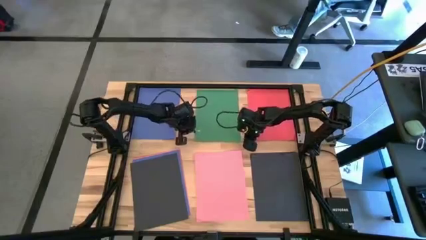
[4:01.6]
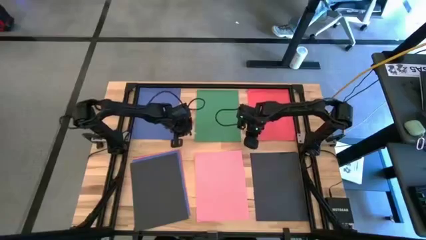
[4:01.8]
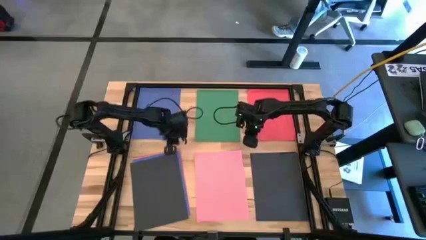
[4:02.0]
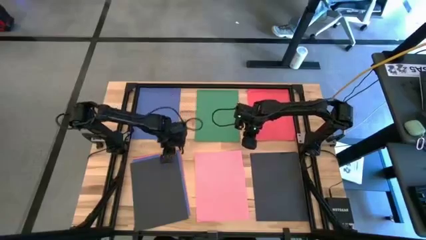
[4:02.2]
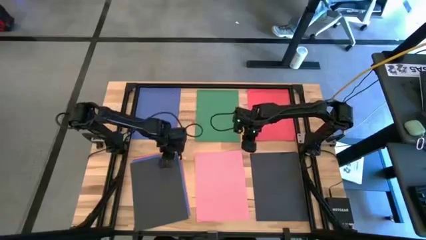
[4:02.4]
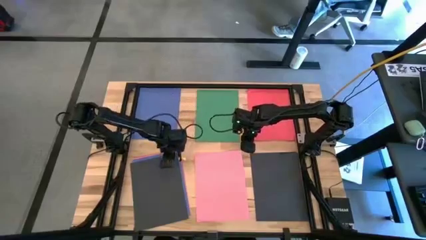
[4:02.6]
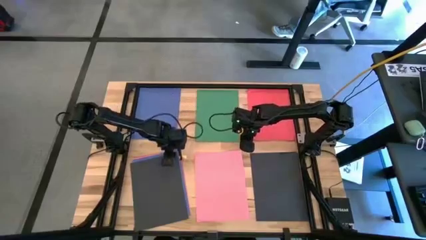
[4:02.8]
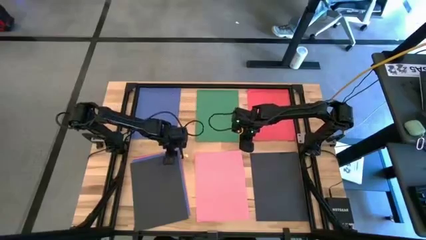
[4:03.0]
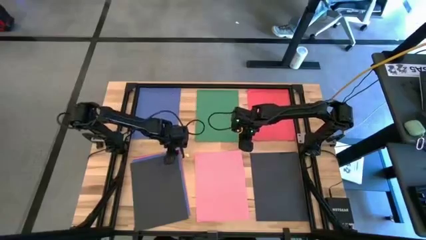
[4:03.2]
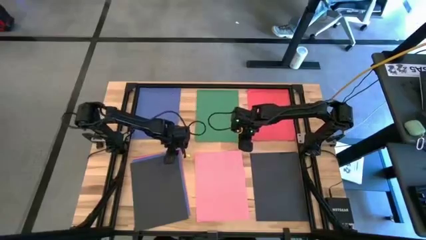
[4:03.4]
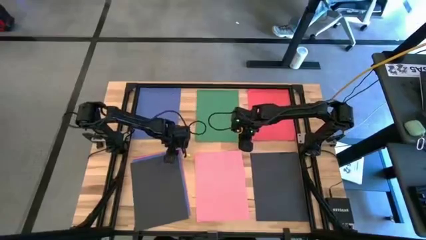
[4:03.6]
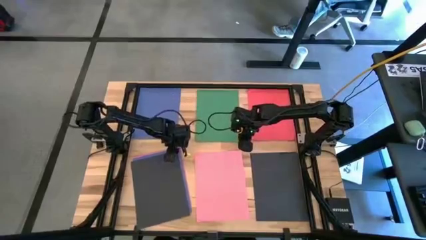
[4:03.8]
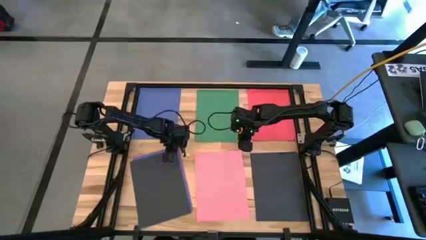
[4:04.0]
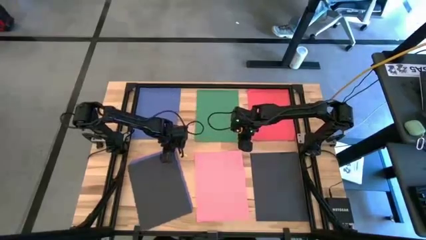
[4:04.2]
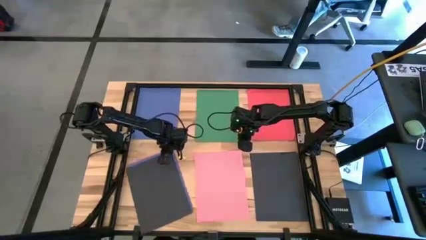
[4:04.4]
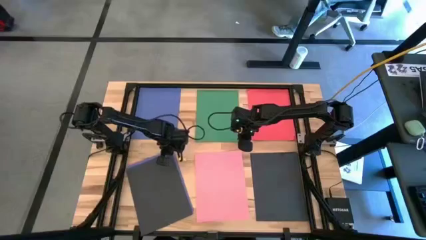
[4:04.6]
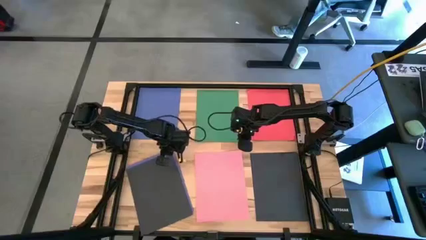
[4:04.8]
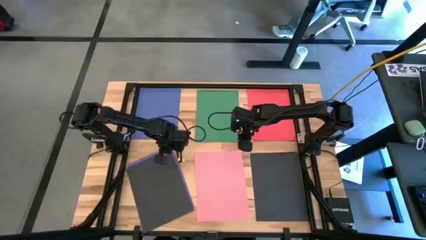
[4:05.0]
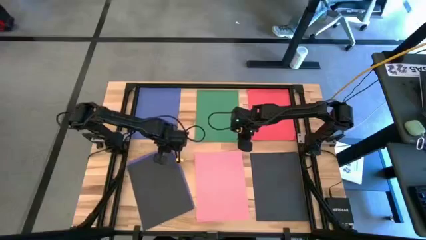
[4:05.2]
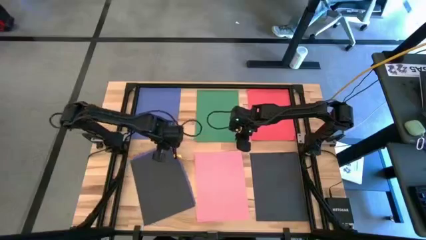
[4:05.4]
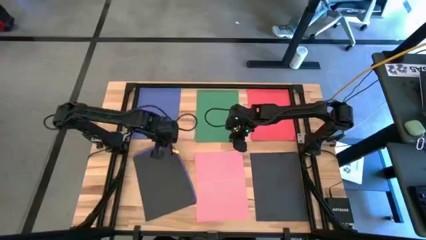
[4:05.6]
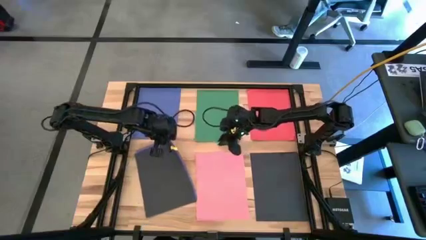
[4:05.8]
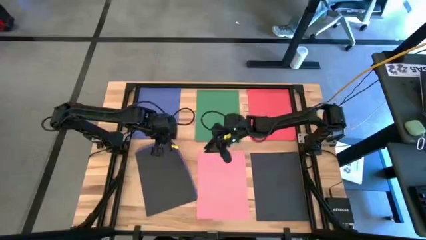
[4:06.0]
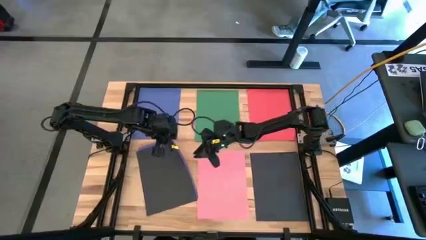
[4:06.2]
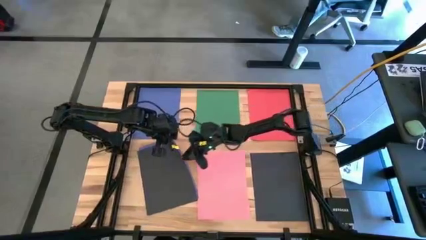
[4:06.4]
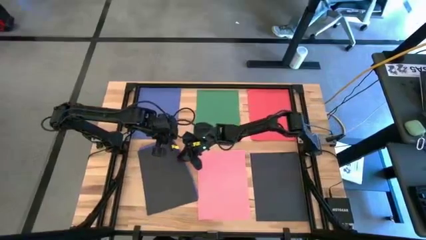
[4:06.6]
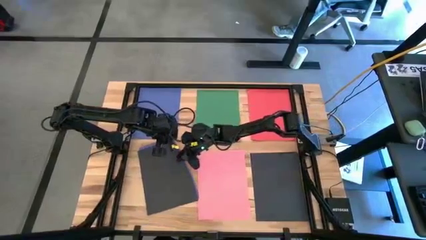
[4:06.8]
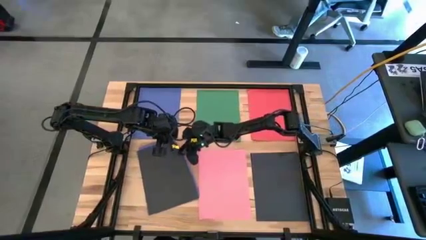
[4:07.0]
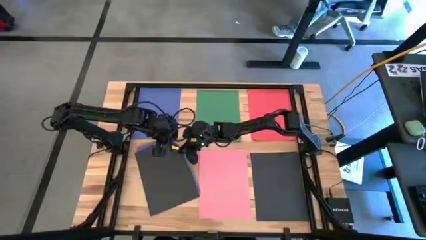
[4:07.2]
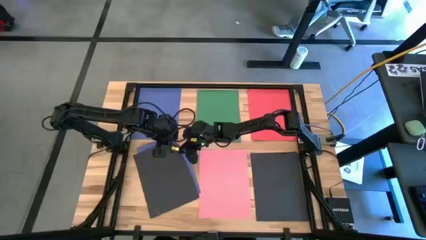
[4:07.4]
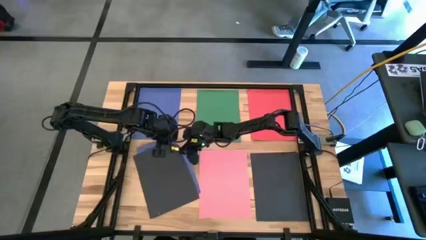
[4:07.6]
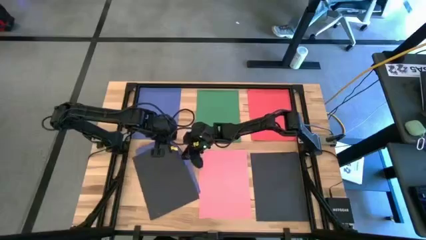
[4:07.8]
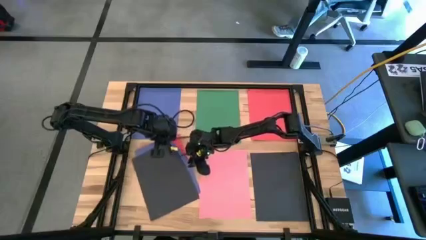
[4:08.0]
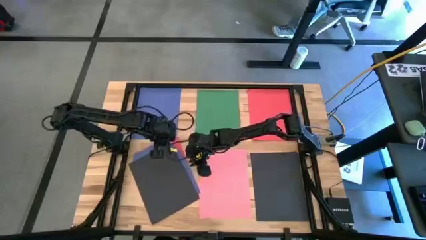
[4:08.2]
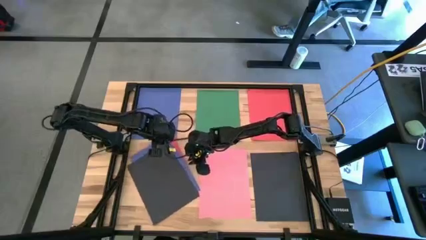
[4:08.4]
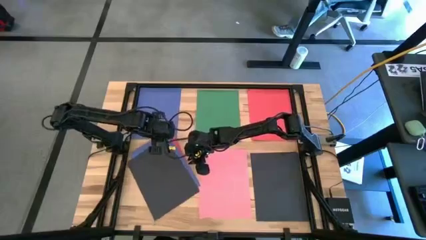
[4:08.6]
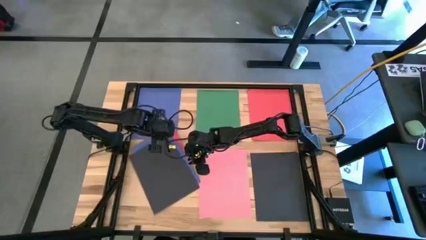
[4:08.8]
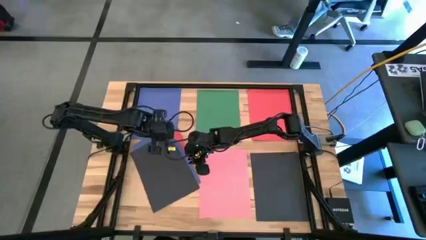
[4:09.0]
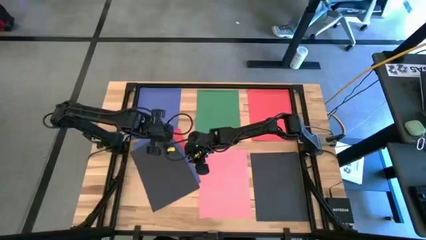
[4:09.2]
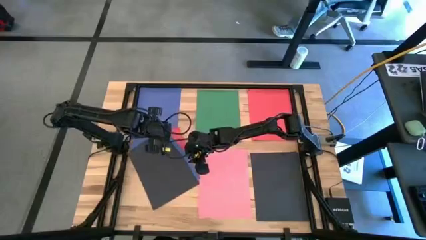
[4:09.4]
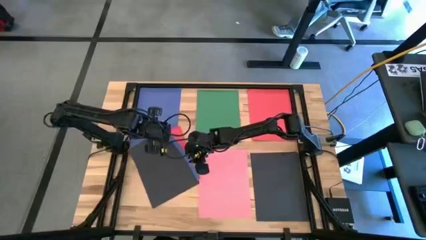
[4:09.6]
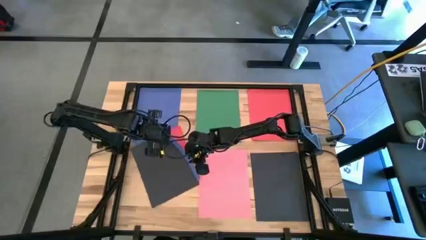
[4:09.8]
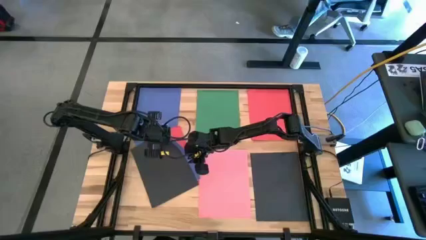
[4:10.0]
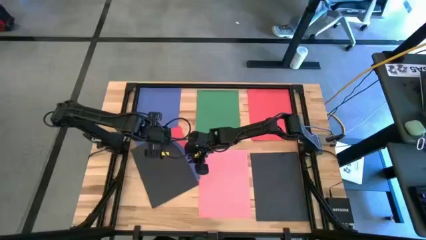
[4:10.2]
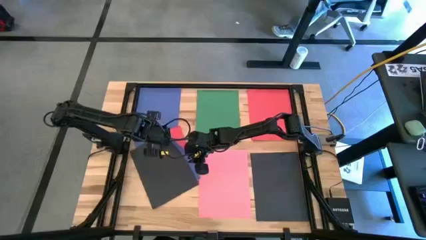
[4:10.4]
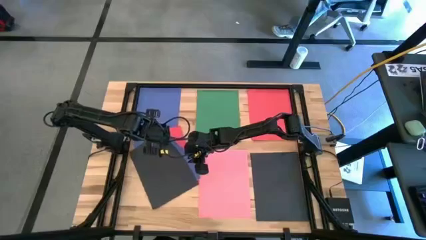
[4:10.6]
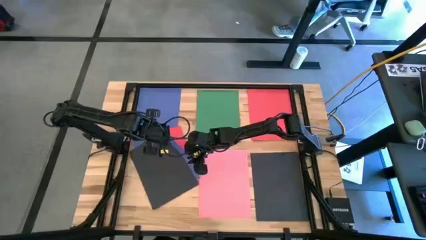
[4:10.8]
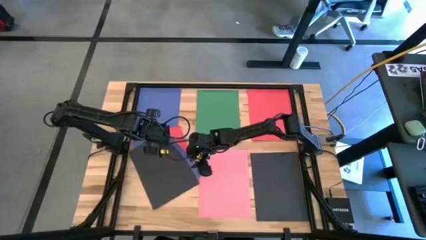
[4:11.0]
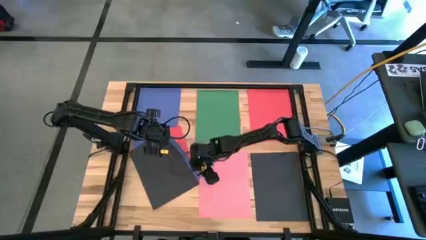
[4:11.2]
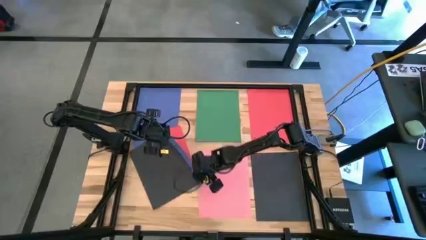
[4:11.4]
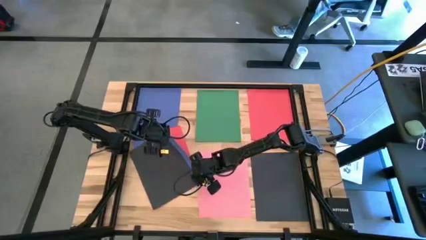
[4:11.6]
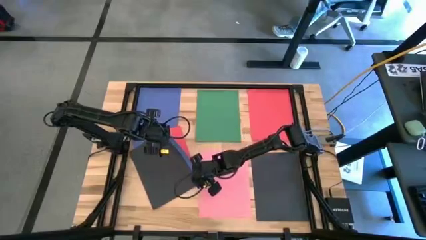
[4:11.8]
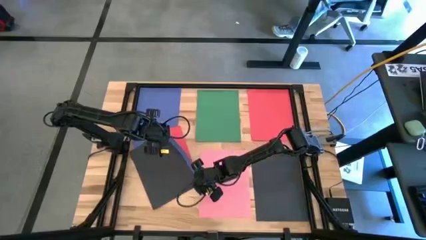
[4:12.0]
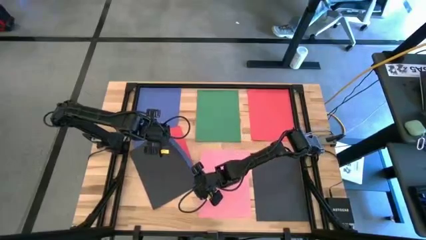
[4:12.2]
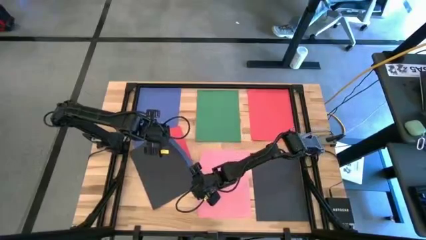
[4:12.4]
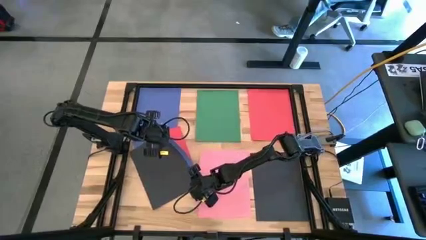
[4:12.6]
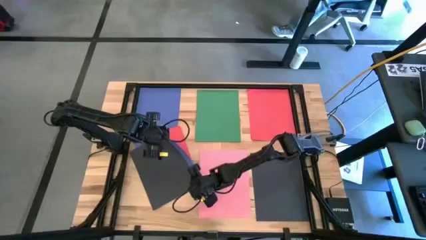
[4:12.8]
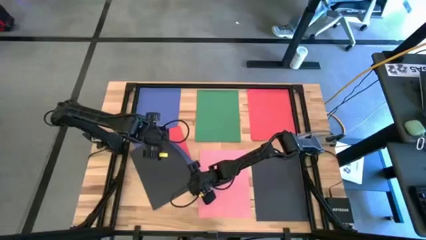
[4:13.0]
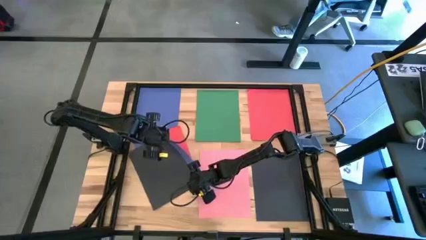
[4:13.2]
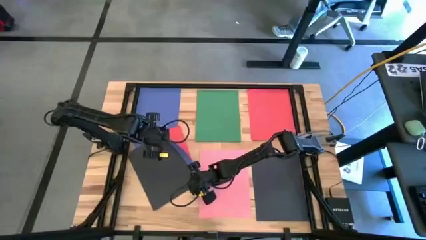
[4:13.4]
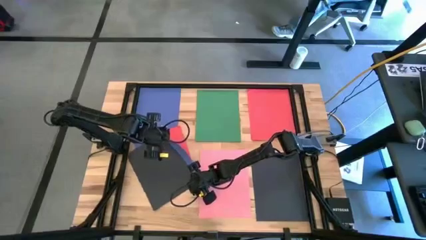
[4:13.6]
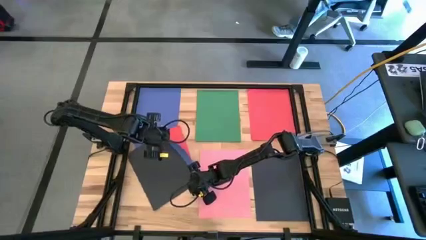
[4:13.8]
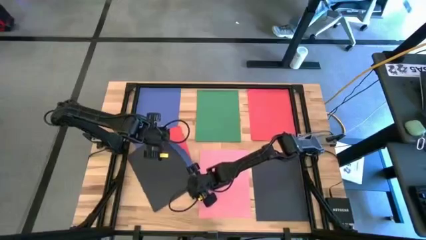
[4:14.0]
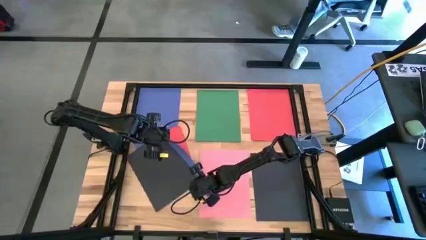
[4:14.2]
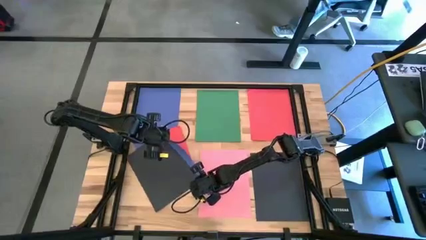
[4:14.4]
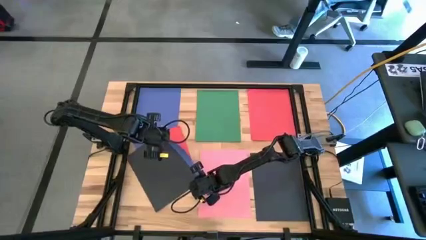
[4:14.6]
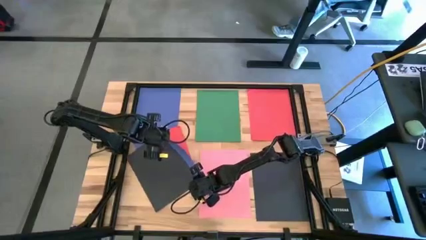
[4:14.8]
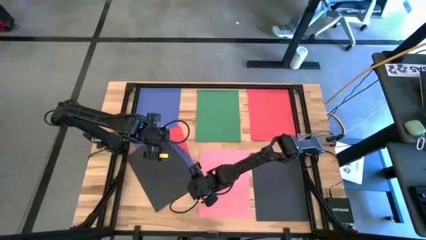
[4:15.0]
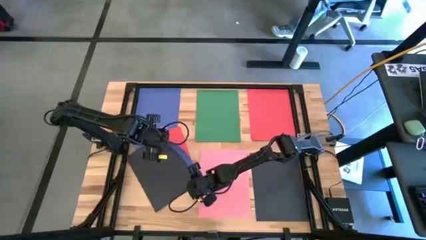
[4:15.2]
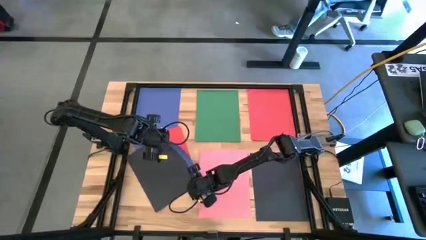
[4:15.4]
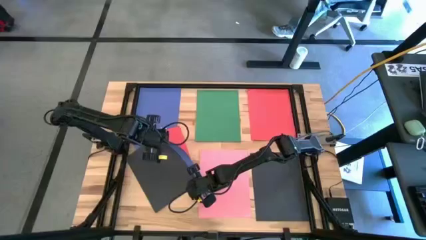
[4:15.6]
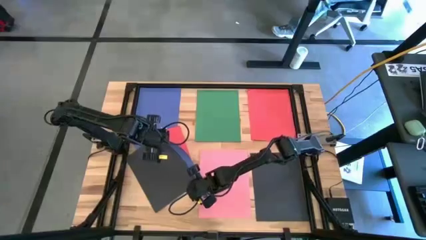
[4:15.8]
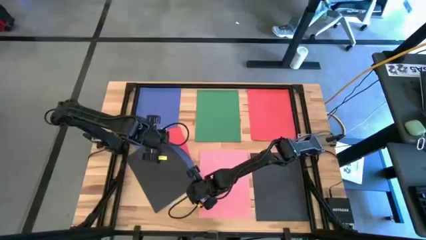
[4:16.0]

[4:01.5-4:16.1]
Task: Organize paper
Stack the black paper on top of the other black paper

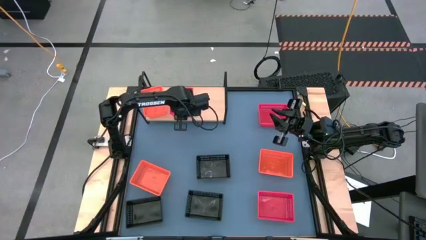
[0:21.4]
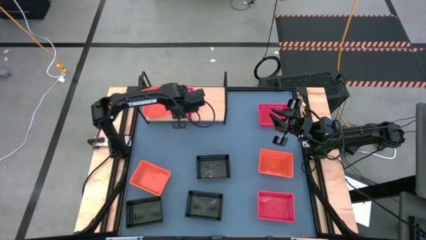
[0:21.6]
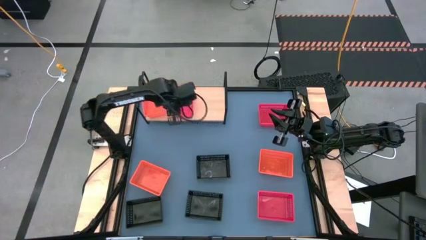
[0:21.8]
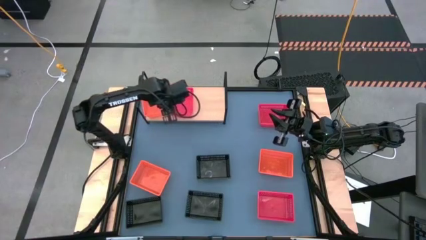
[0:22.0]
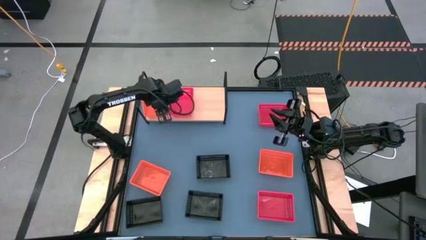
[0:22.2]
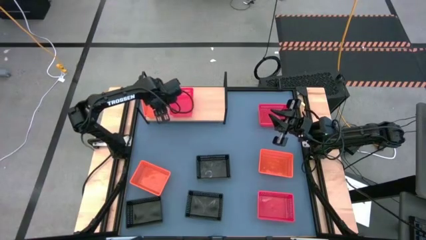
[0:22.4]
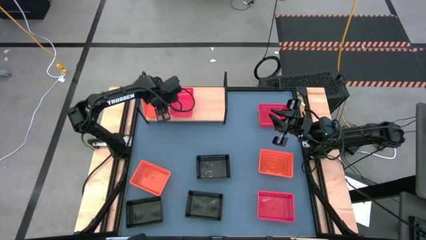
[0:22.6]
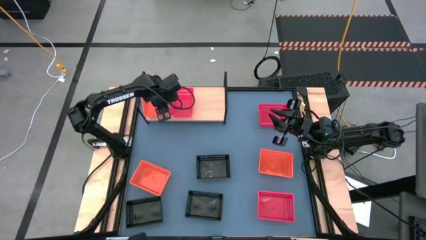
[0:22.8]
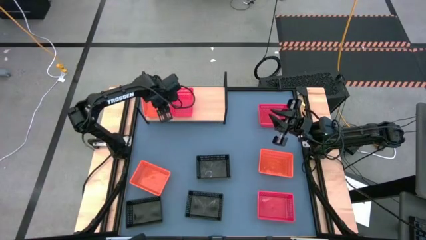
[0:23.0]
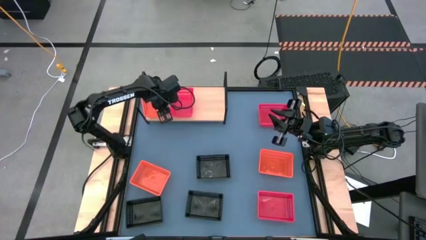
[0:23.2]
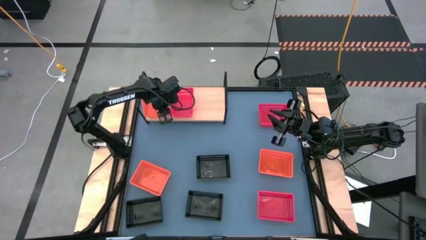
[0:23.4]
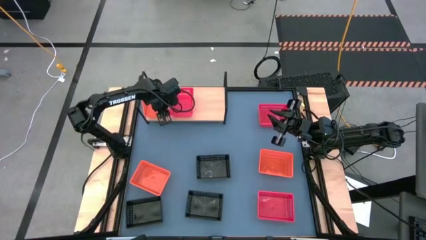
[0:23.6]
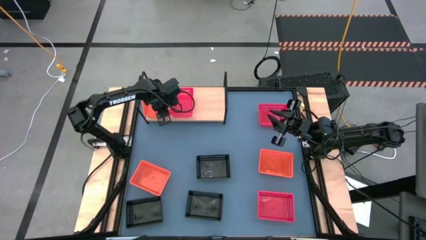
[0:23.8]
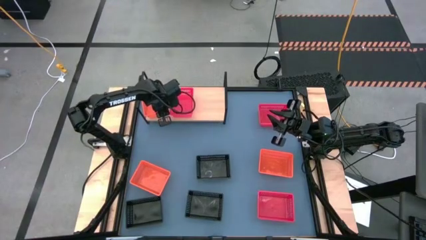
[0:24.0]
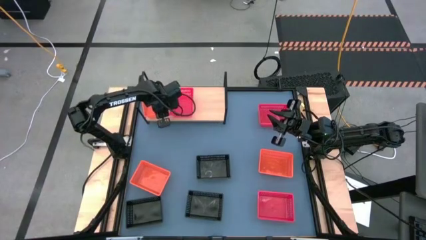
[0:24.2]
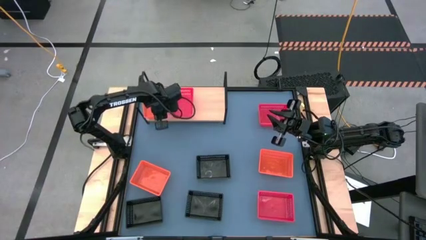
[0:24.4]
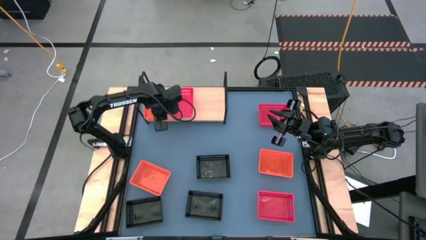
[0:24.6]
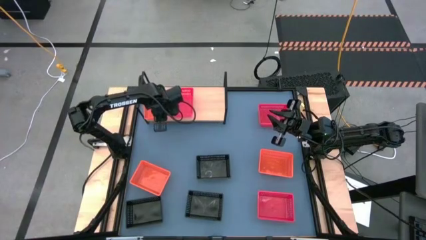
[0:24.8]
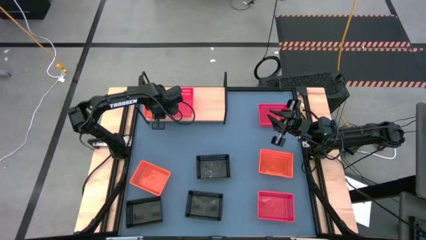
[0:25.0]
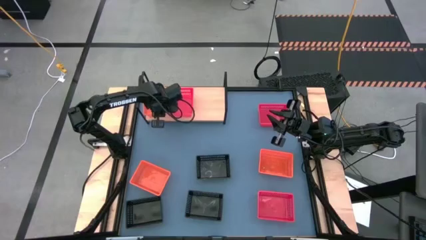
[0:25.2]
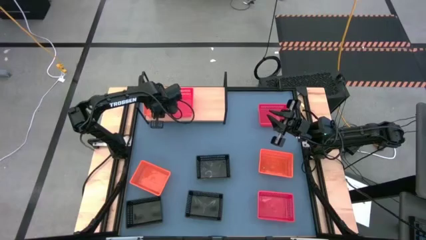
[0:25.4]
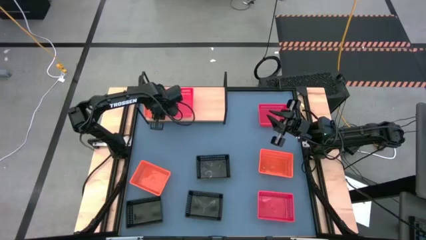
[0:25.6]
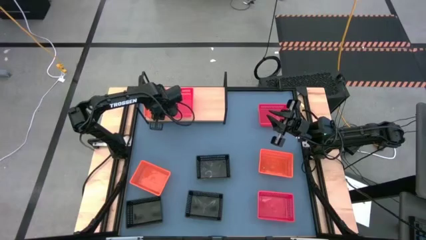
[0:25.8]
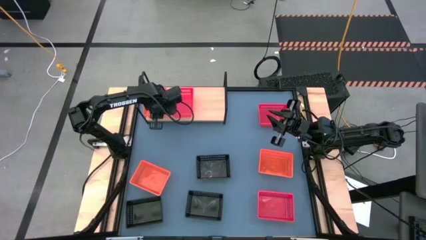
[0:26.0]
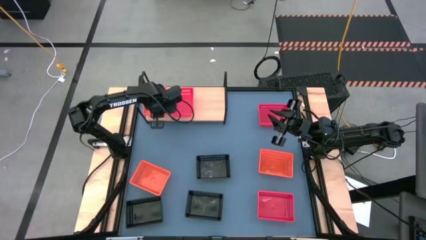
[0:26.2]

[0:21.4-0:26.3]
Task: Stack baskets on shelf by color
Adjust the orange bin on the shelf
